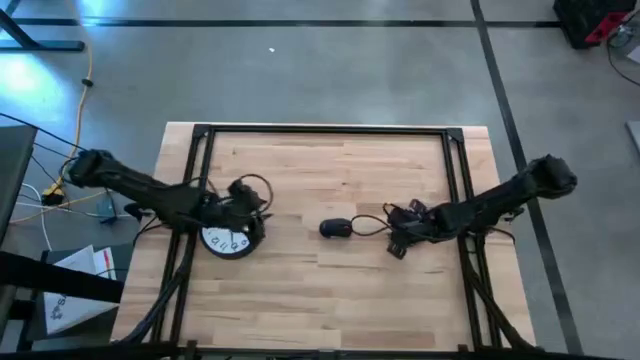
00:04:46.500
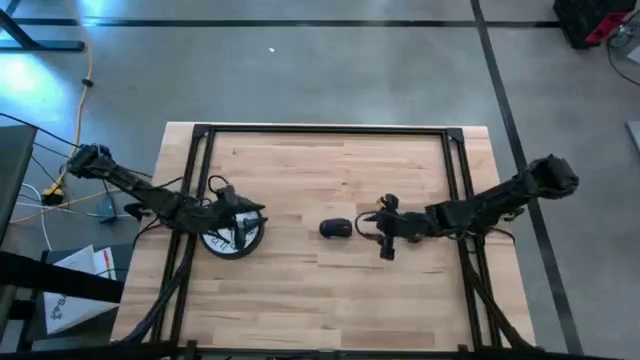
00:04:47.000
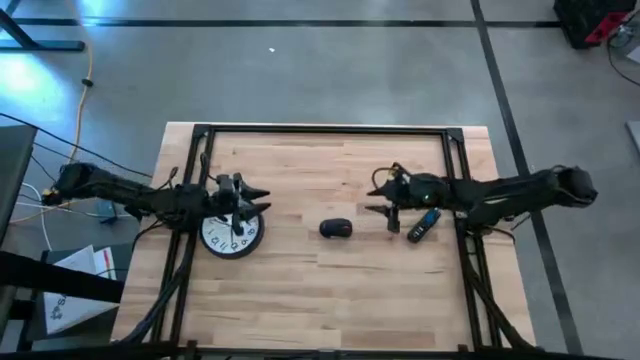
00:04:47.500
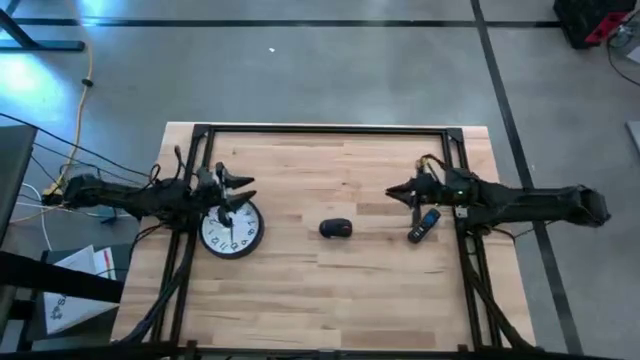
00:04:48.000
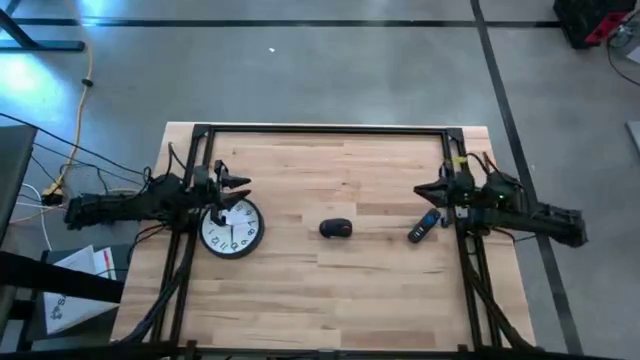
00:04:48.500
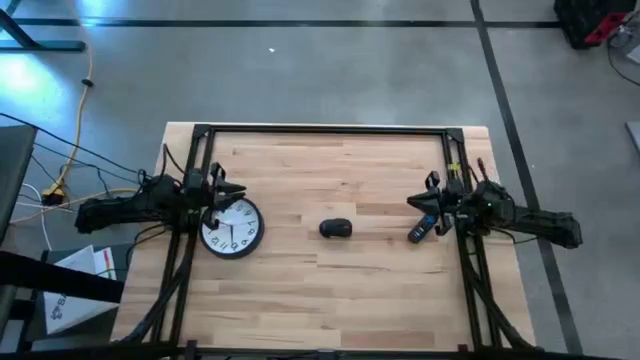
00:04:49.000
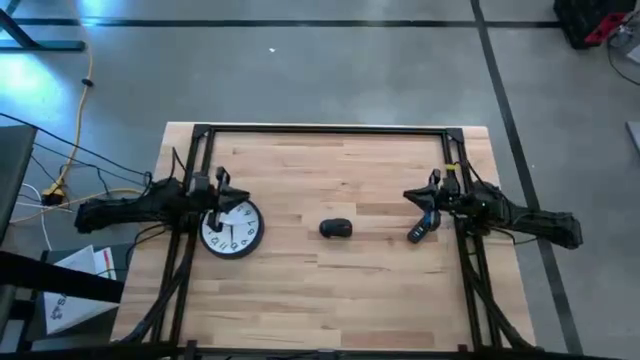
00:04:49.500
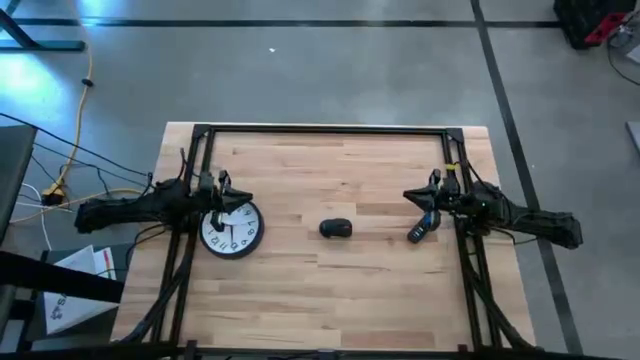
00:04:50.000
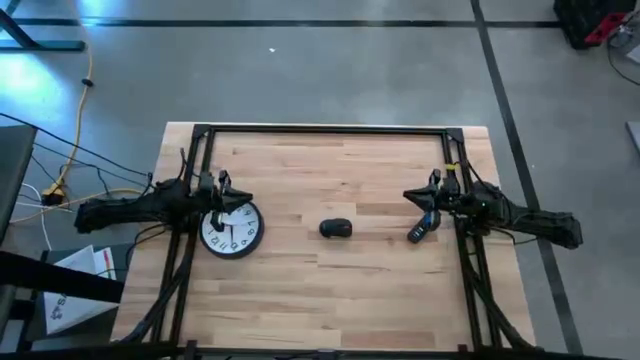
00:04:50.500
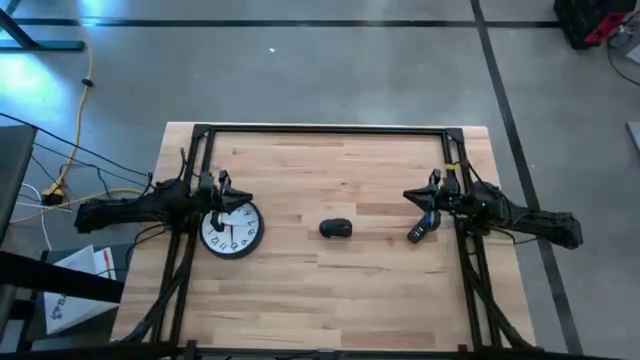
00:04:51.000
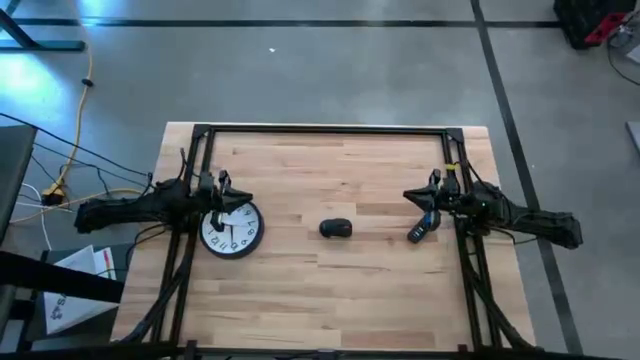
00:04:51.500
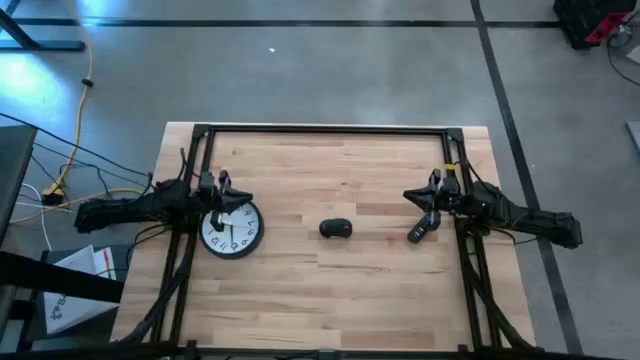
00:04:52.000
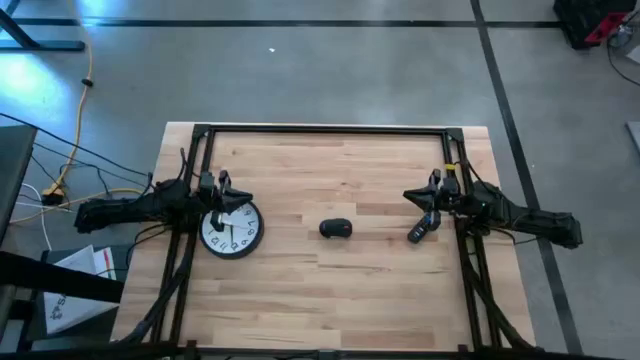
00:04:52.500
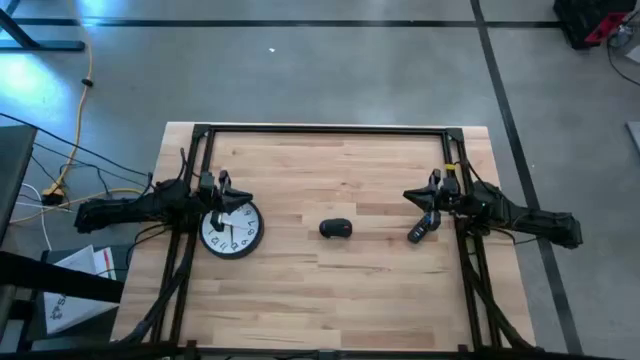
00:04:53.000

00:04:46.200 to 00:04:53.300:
Task: Insert battery
Return to Home Position

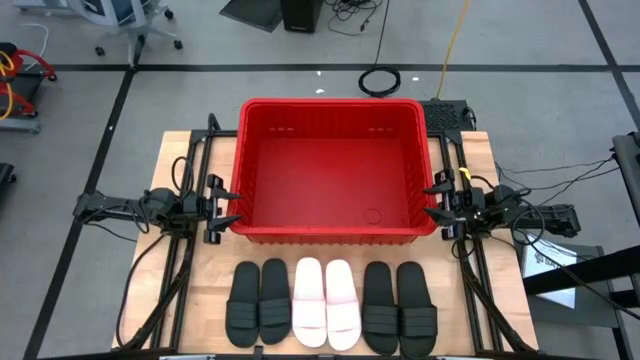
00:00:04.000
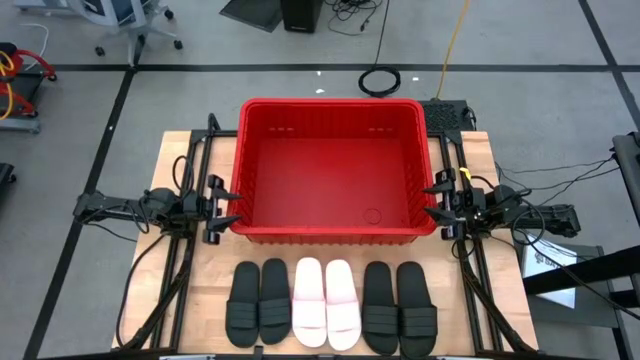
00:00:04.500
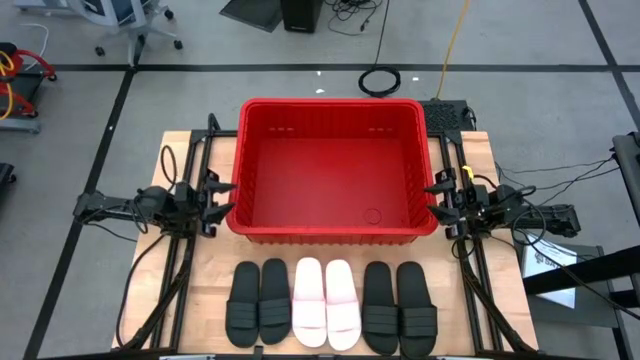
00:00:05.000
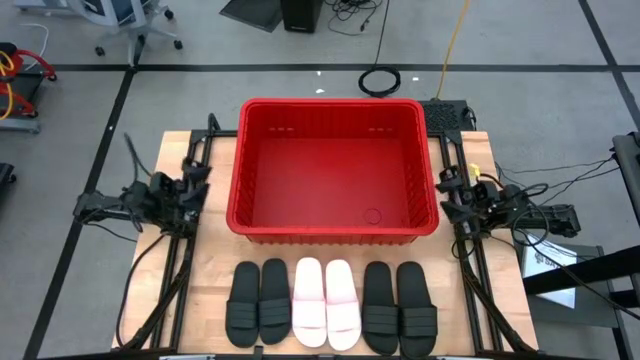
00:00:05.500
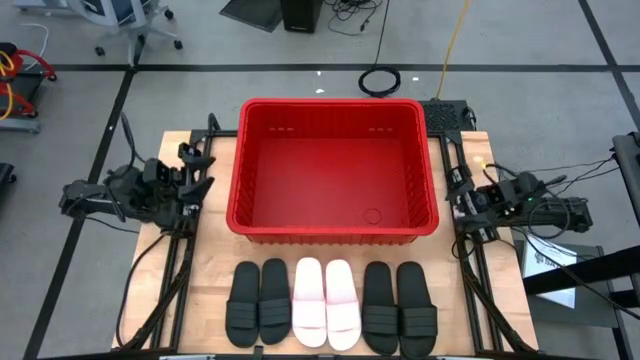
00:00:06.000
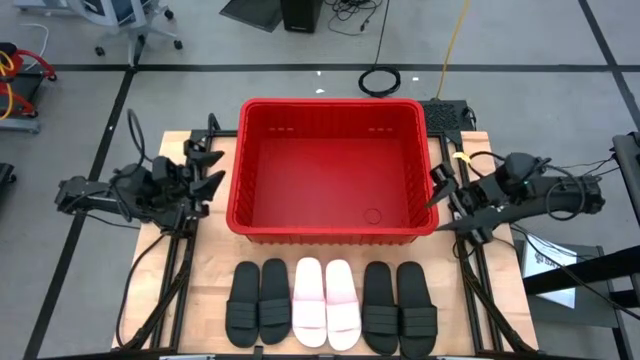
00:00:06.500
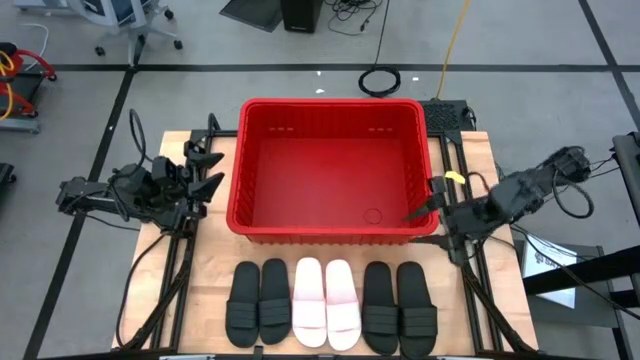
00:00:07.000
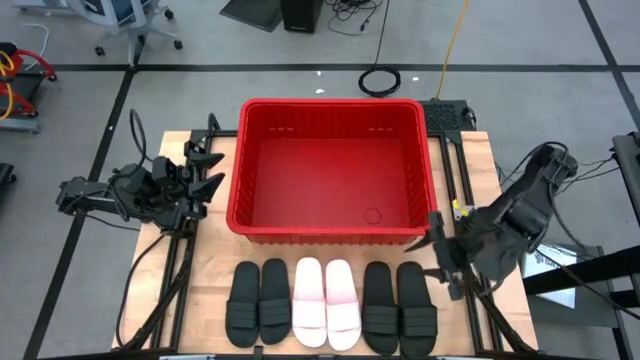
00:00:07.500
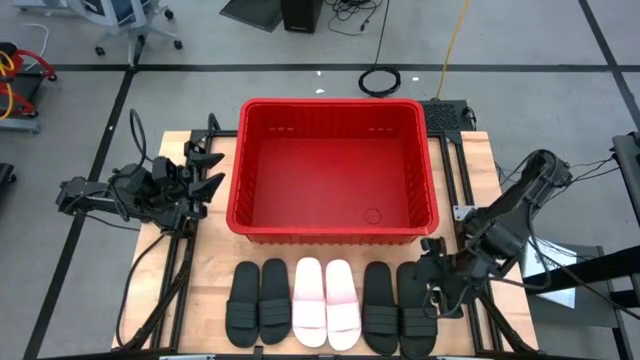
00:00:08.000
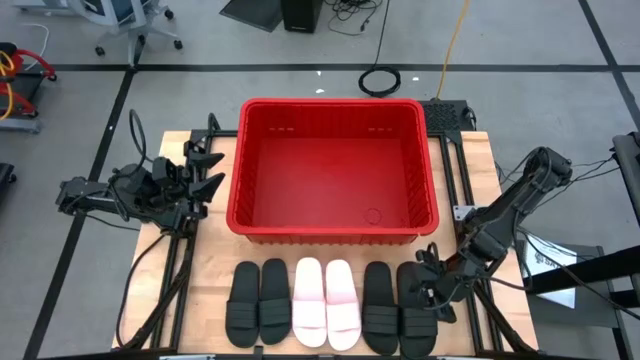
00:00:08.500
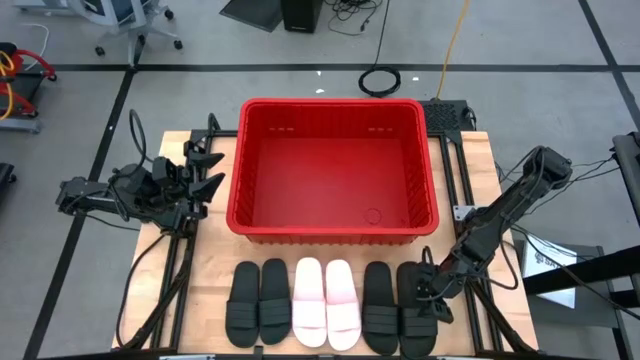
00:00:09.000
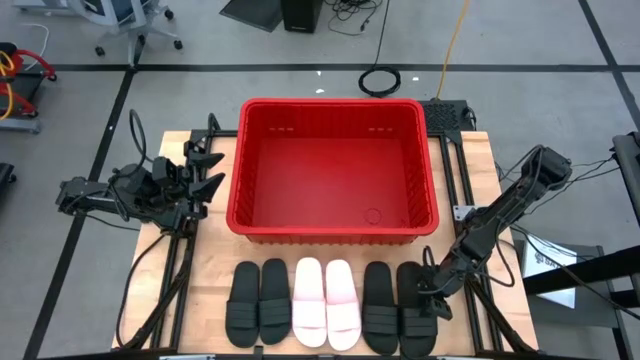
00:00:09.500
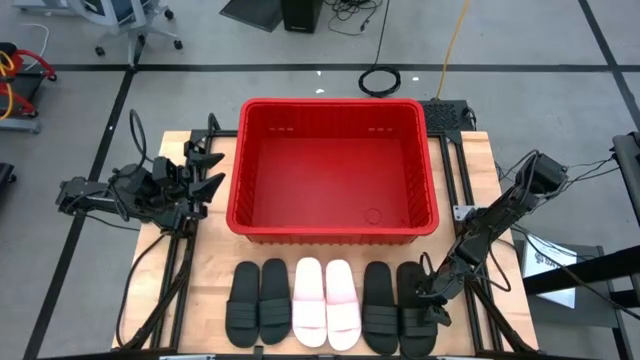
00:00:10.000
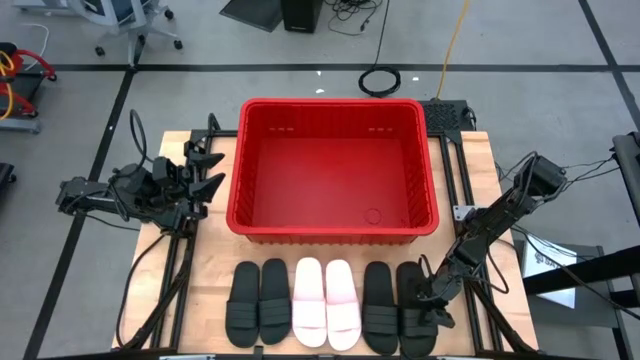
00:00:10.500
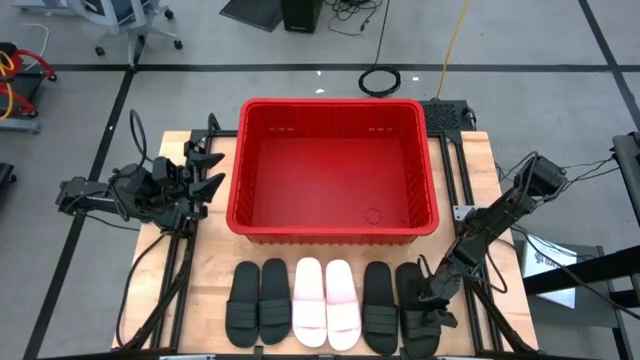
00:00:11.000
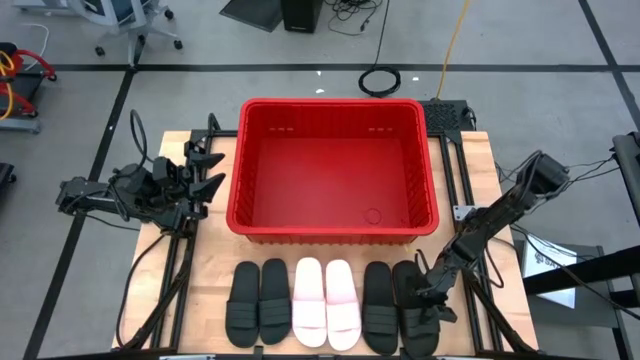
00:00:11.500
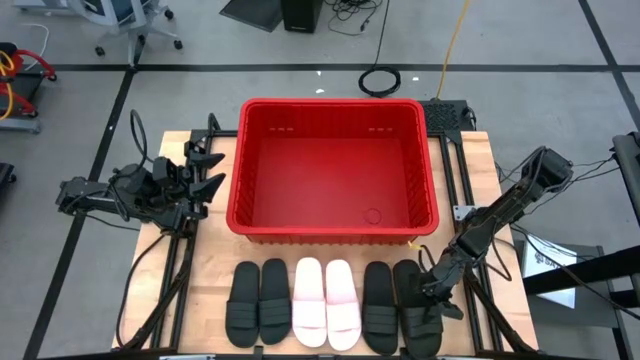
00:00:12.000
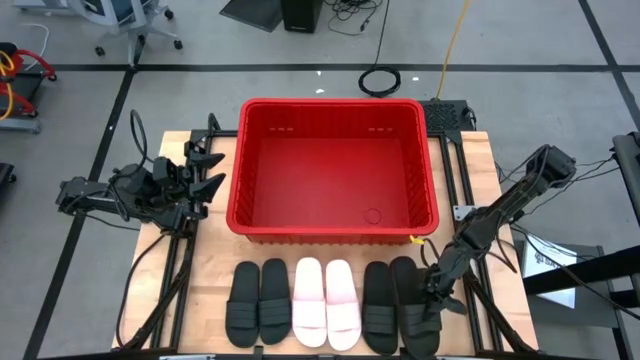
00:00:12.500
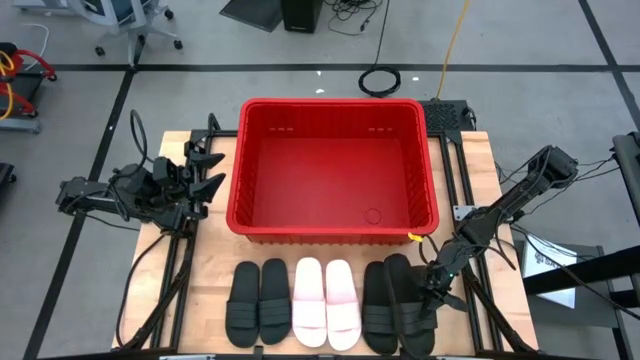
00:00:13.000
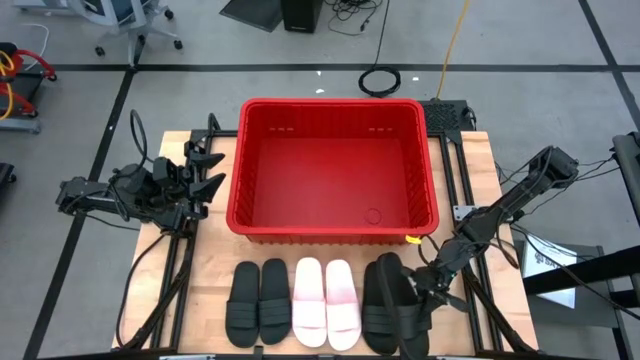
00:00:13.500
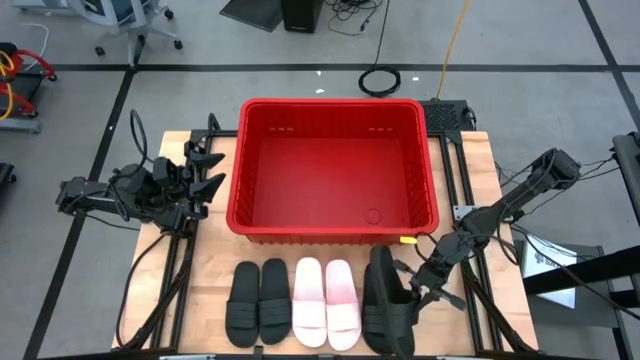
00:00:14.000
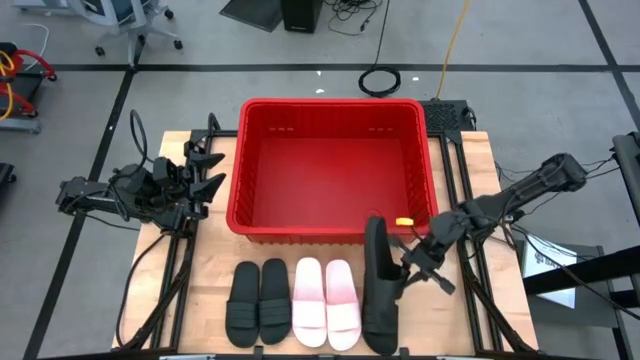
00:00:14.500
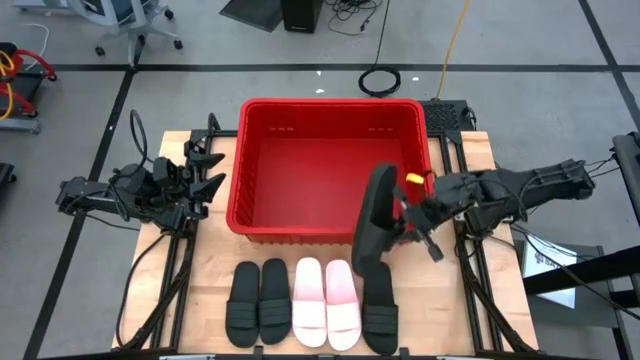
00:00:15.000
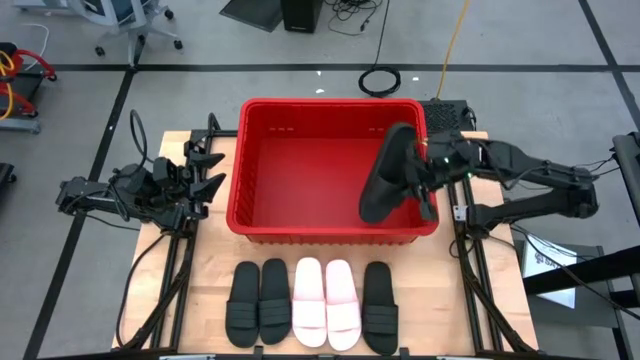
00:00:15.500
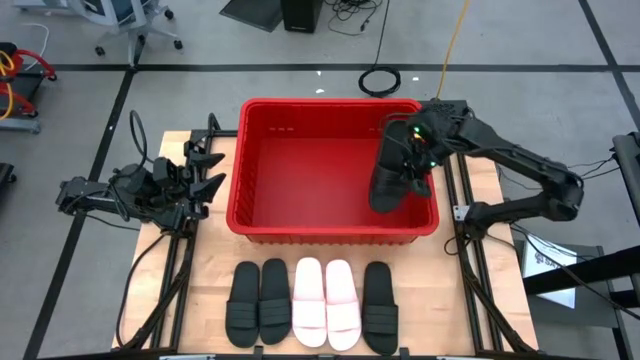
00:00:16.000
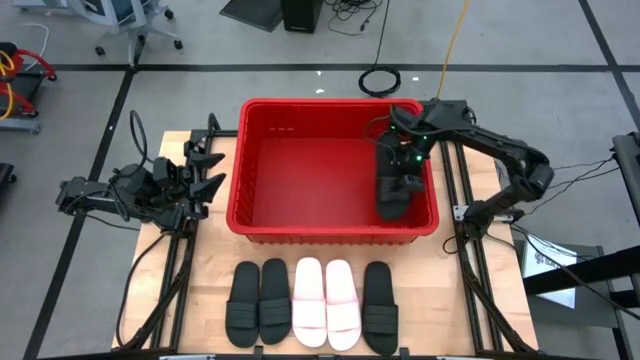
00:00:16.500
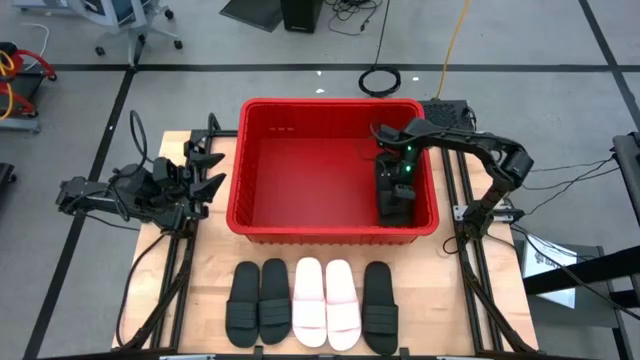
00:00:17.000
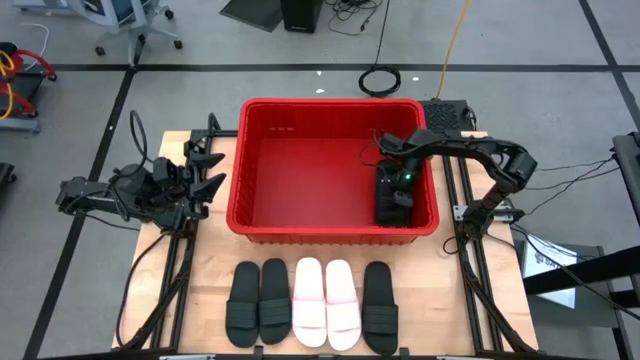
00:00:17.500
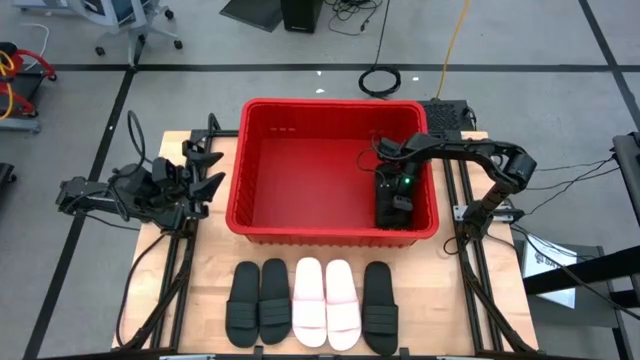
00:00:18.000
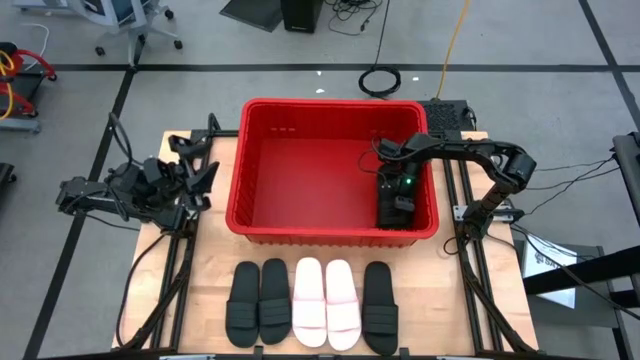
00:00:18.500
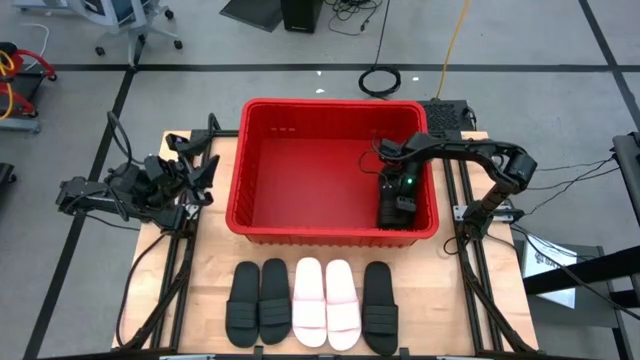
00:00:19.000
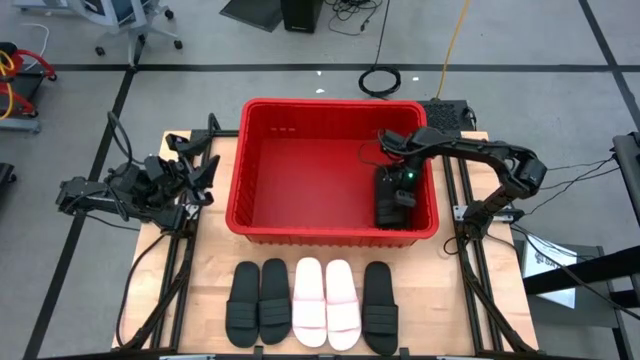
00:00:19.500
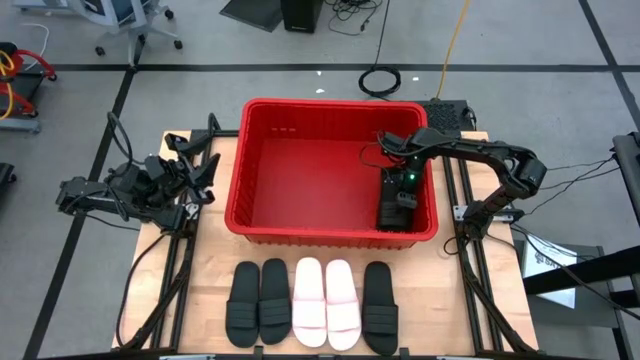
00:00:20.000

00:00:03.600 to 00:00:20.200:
Task: Pick and place slides into bin
Put the middle right black slide into the red bin
